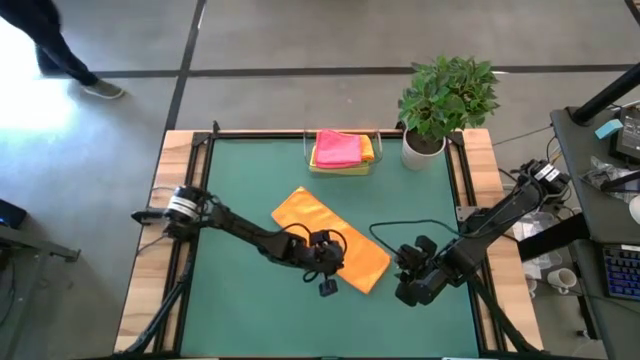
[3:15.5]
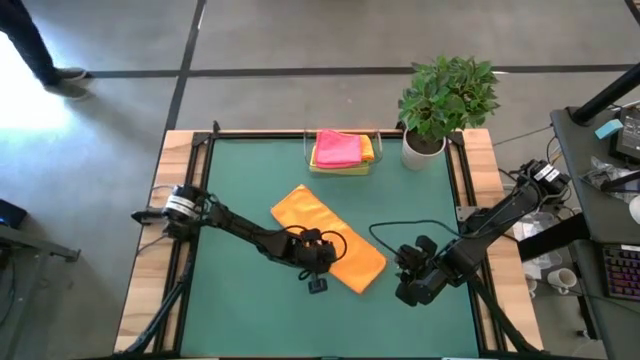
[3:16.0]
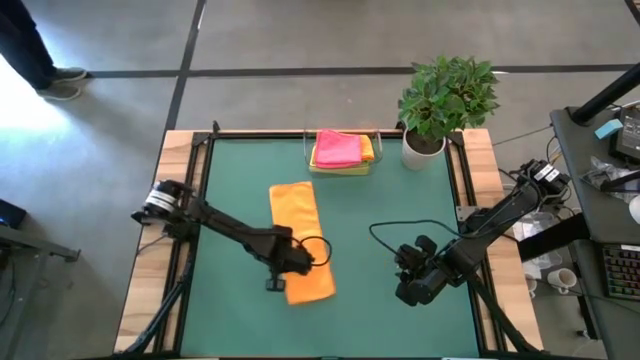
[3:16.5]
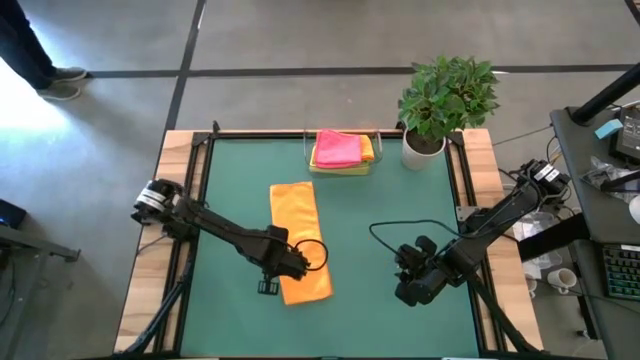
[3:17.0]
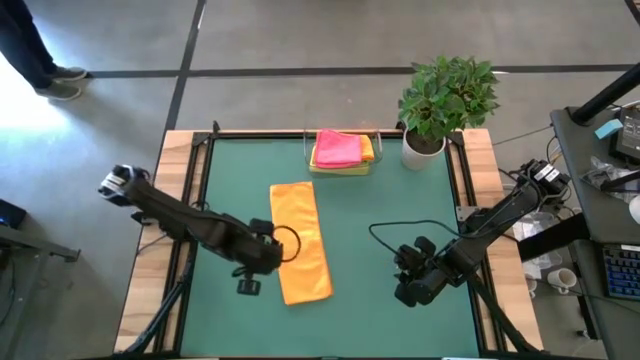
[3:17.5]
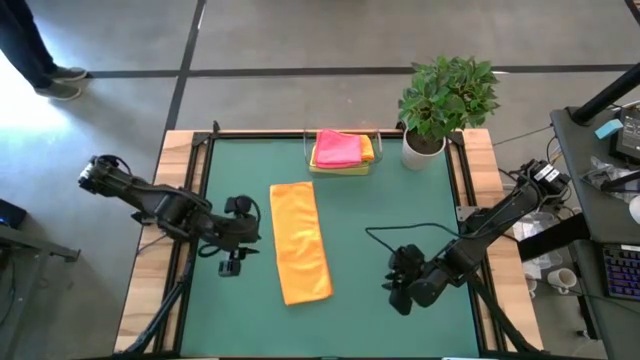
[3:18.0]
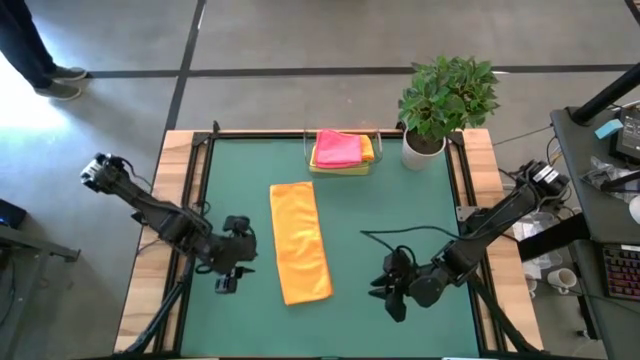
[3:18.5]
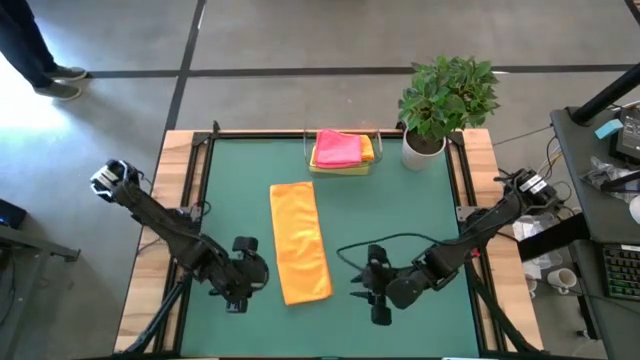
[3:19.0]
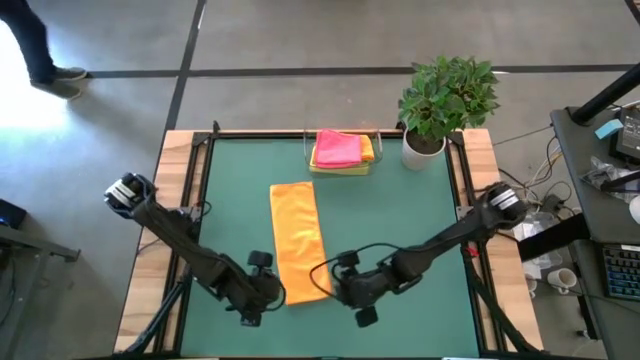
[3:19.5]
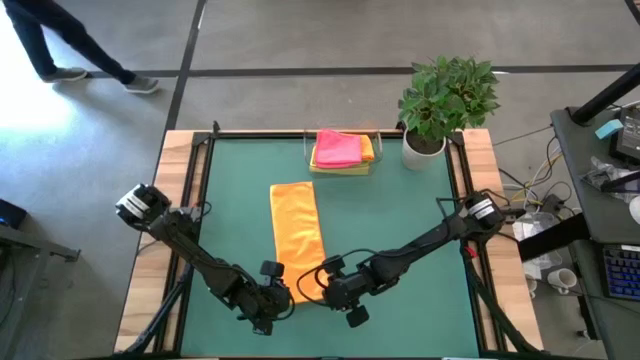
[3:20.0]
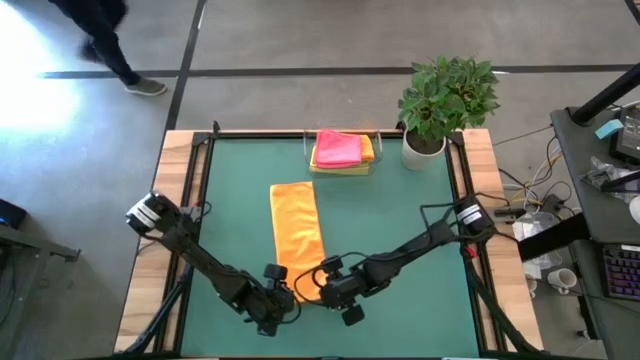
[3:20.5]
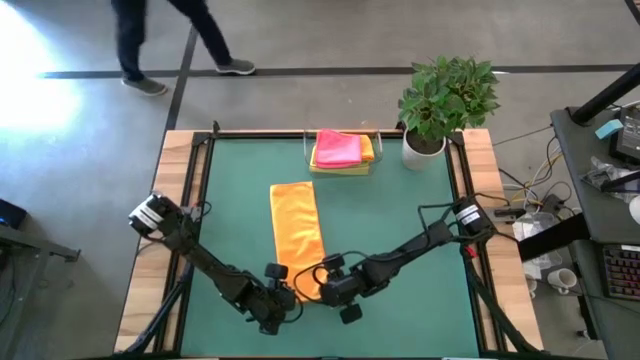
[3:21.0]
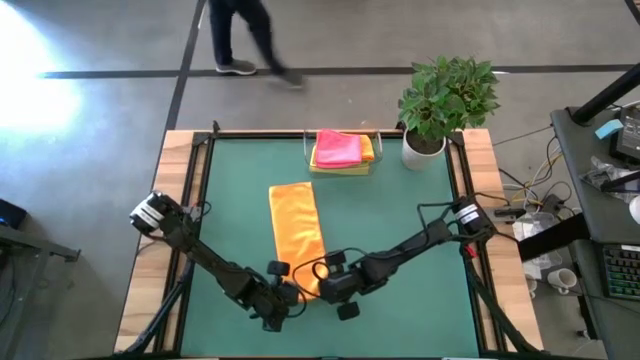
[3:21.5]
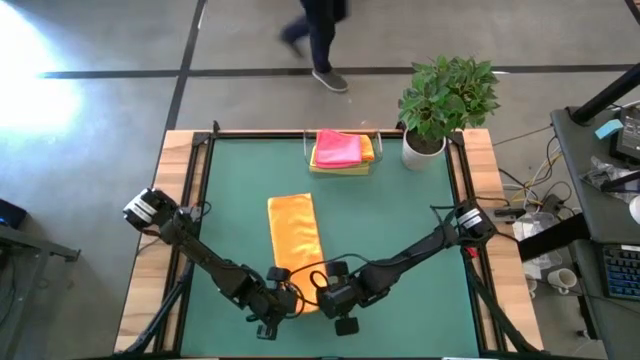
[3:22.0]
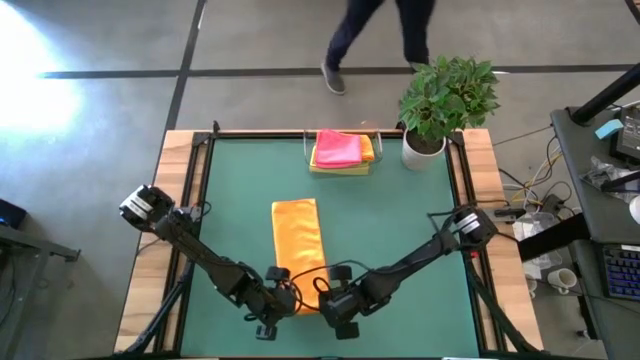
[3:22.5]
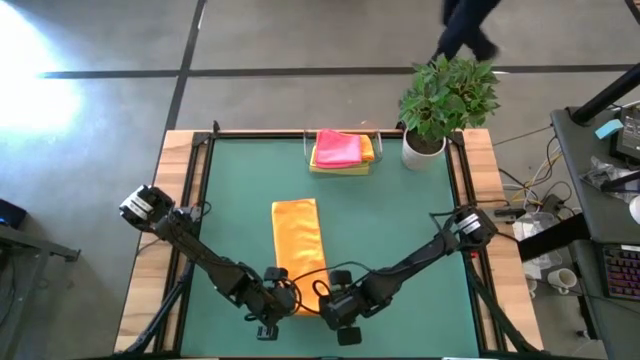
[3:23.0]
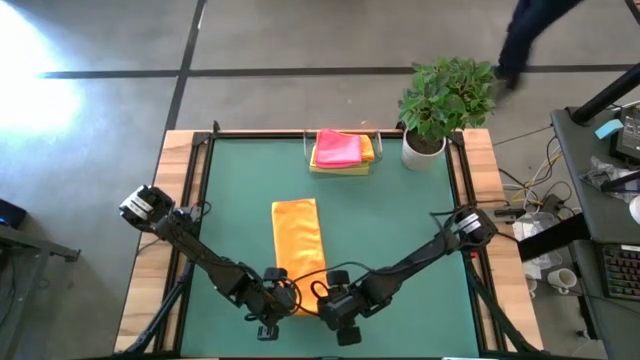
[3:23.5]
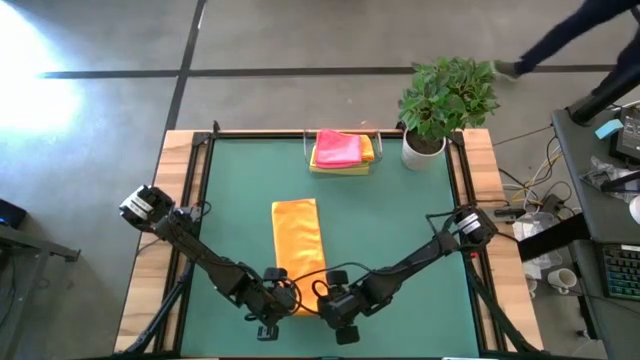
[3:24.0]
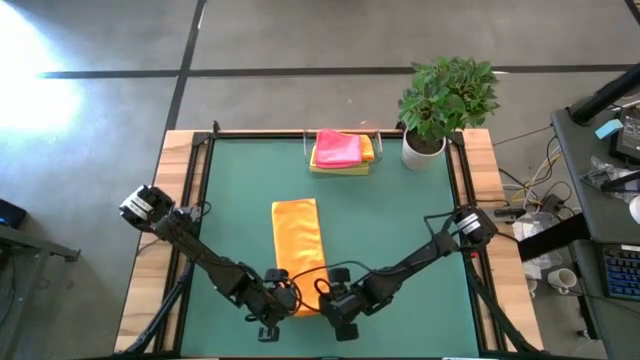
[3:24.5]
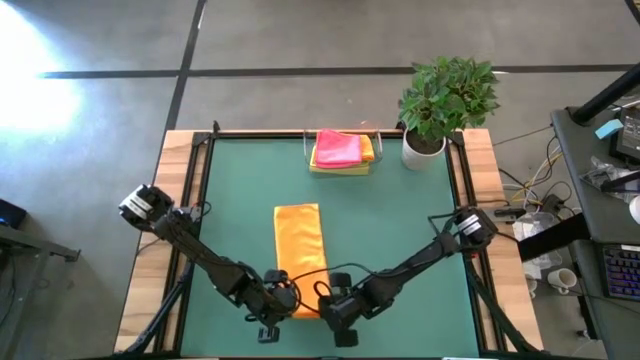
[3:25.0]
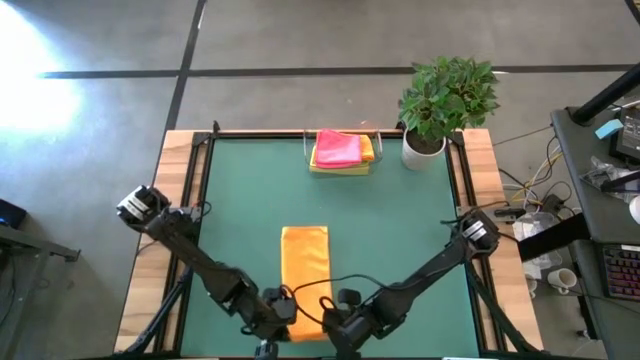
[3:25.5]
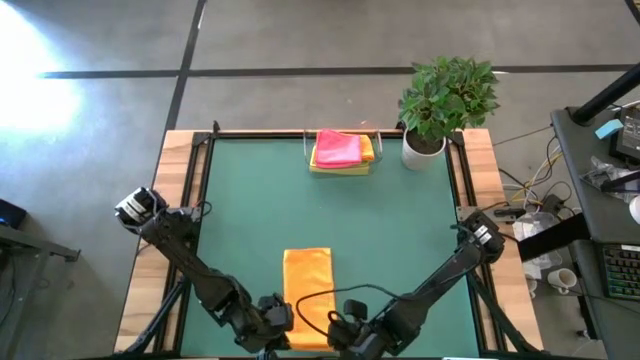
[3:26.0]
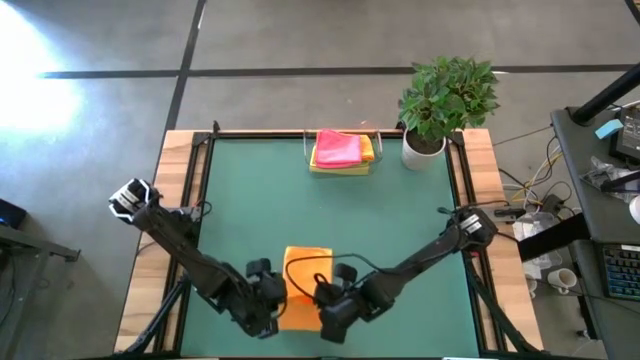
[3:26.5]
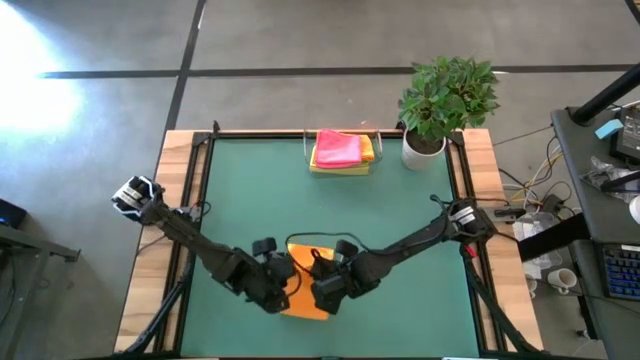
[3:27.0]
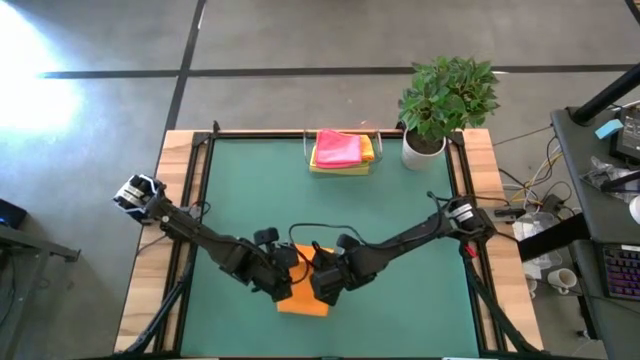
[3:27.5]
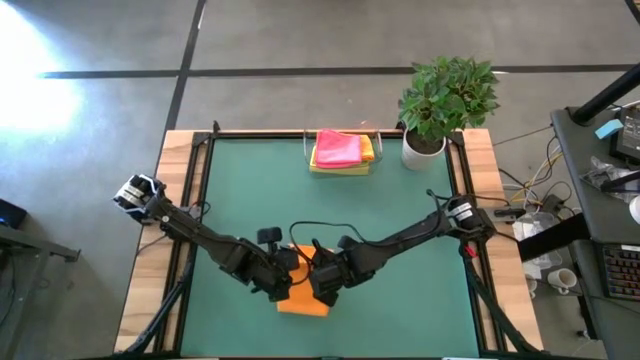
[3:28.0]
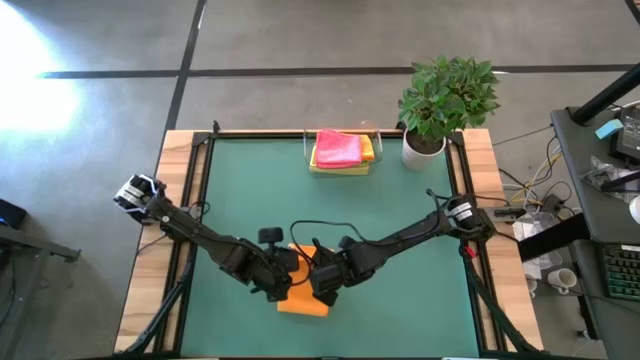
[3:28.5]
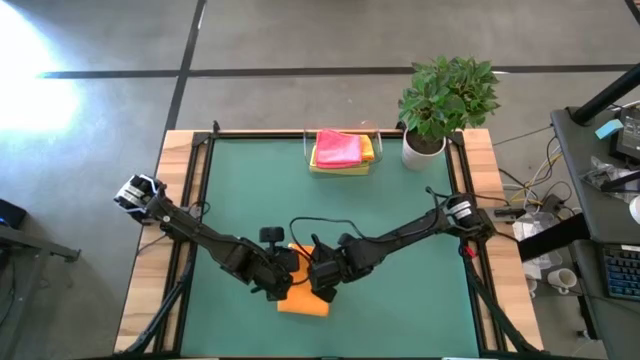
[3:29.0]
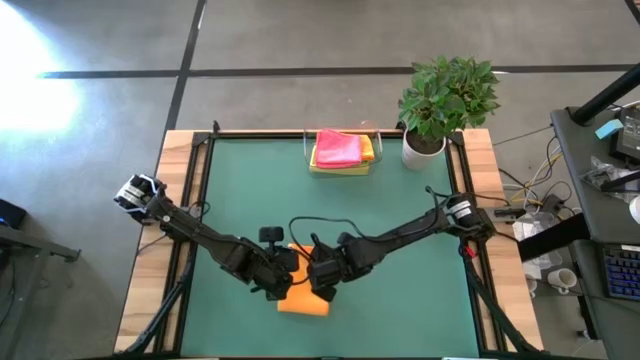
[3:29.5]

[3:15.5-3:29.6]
Task: Fold microfiber towels
Fold the orange towel

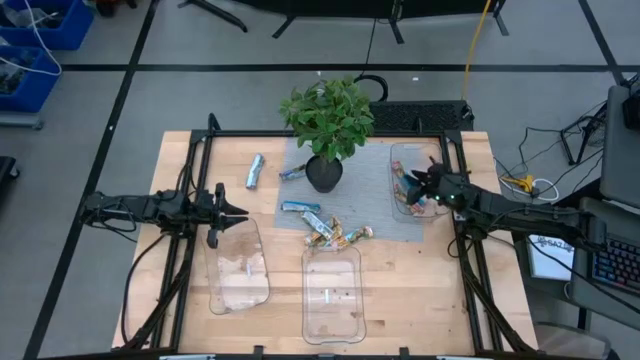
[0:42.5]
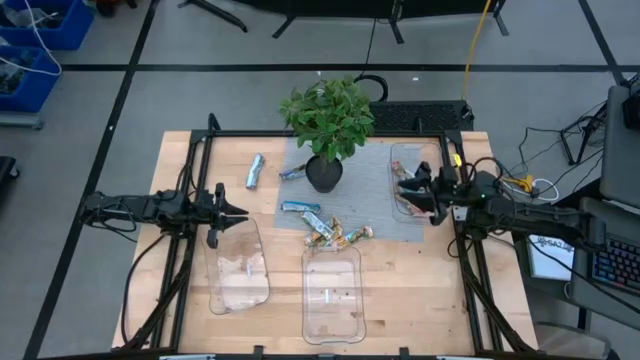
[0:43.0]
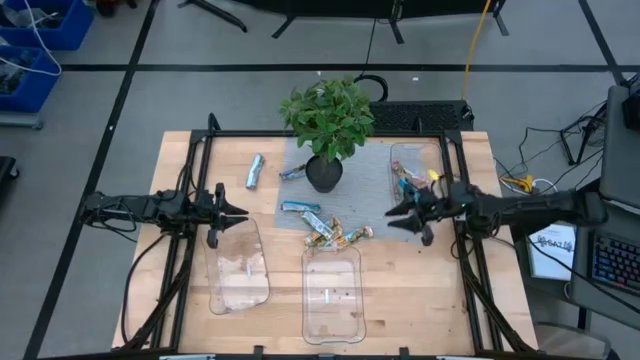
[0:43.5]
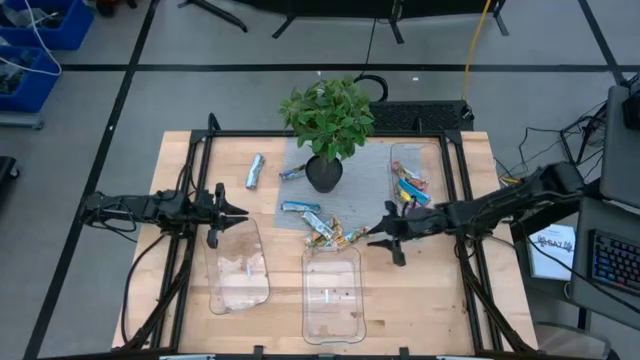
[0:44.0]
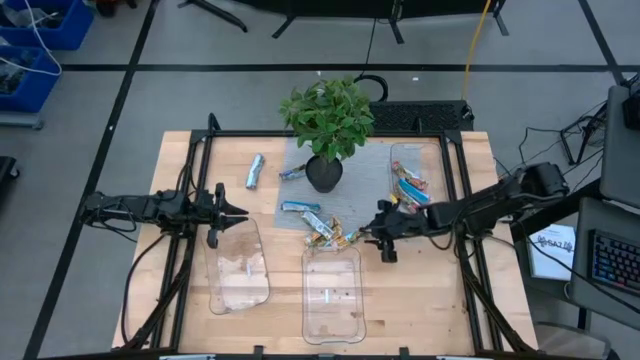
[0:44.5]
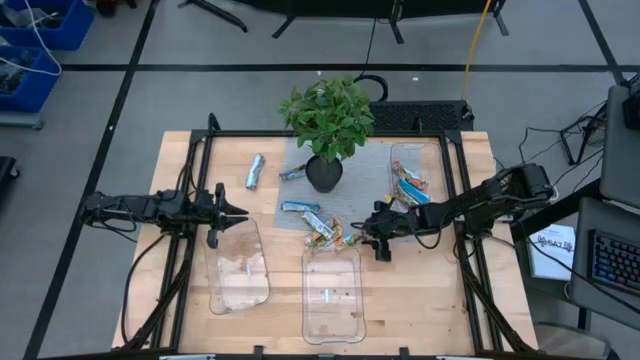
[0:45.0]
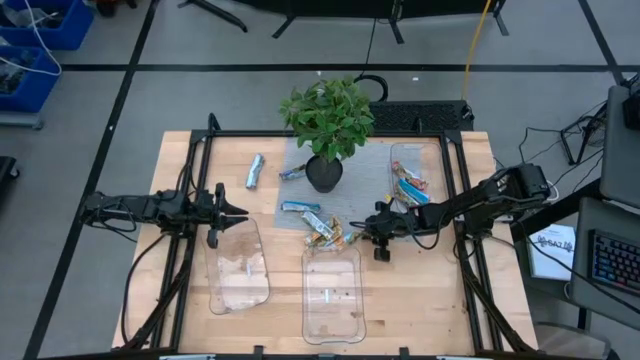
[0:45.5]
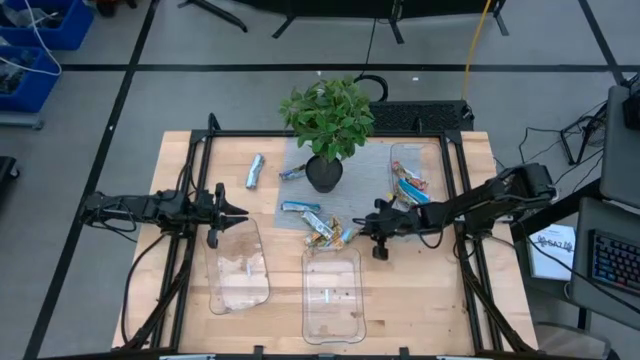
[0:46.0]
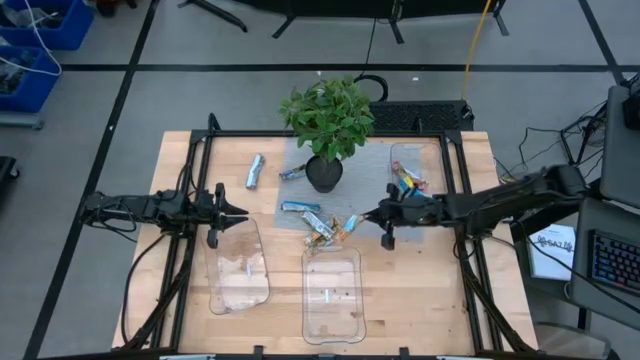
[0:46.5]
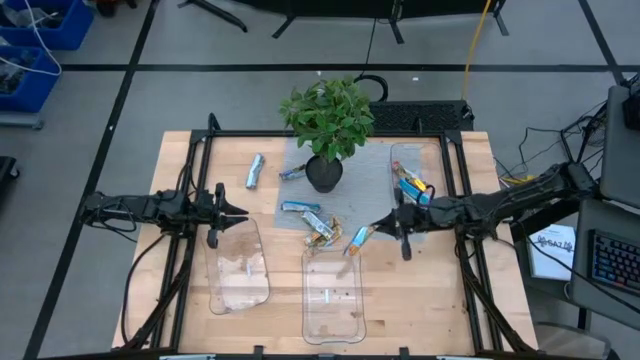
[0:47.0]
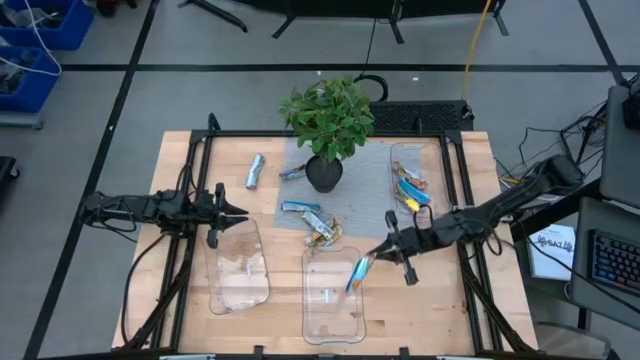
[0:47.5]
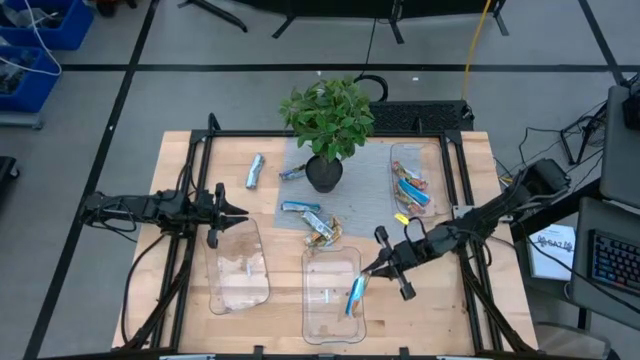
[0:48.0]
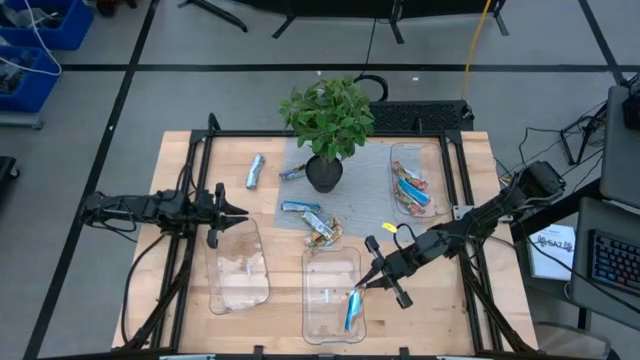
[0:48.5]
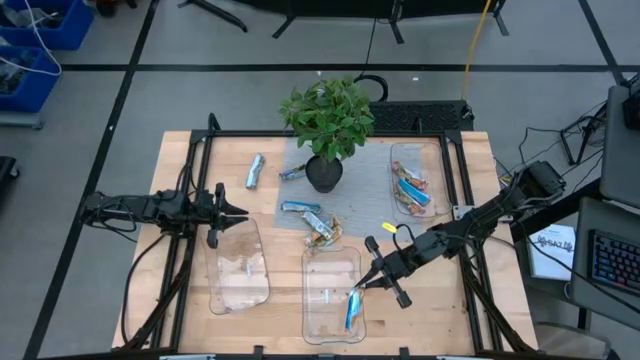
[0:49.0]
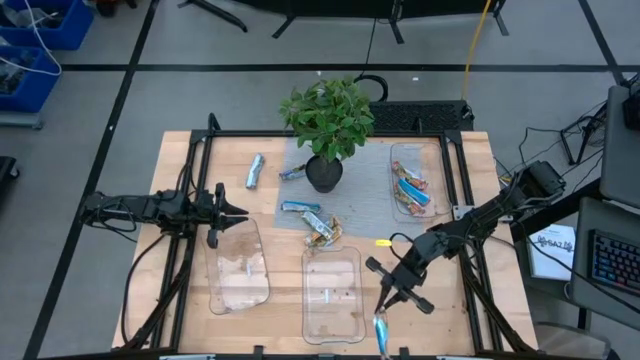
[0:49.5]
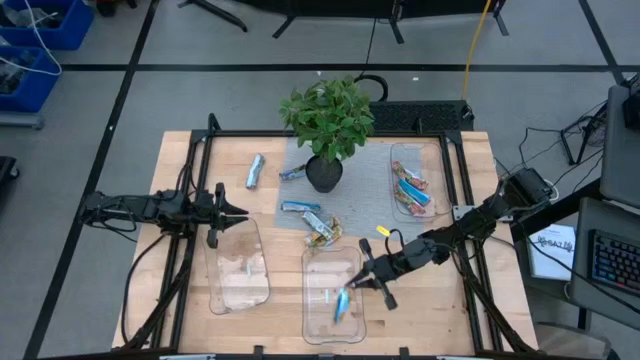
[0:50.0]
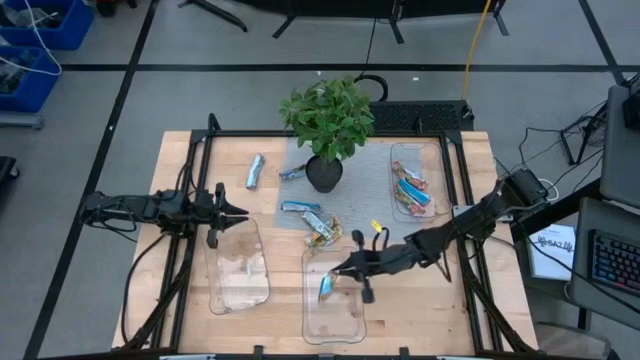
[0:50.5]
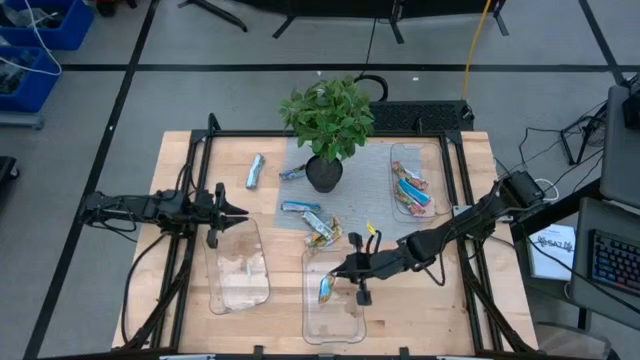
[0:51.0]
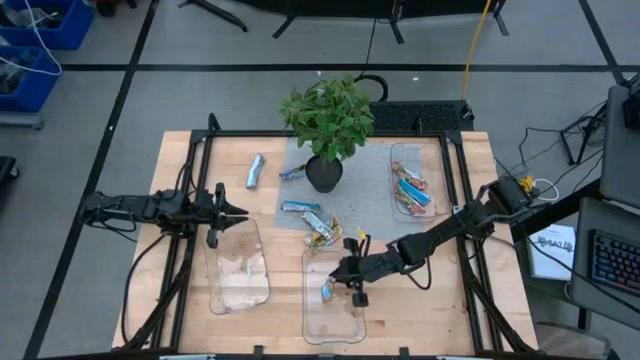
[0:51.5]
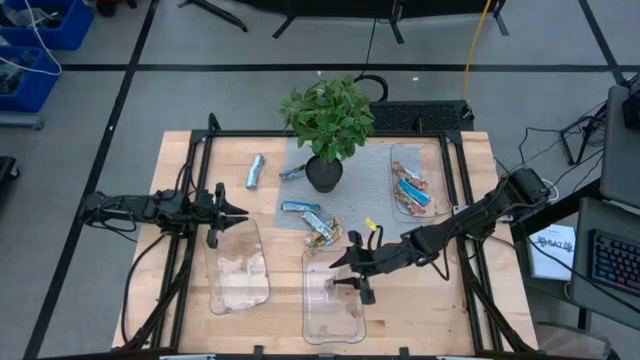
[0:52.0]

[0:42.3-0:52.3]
Task: Pick and place Granola Bars by type
Put the right yellow granola bar into the middle transparent bin
